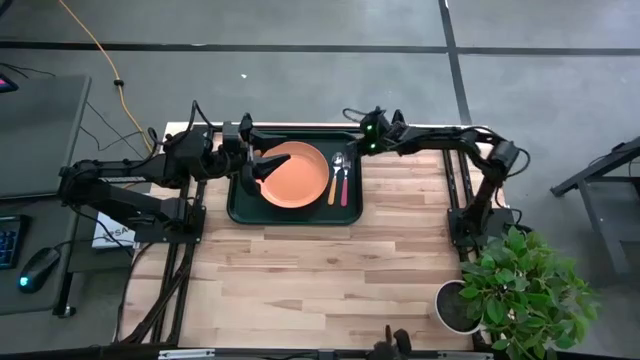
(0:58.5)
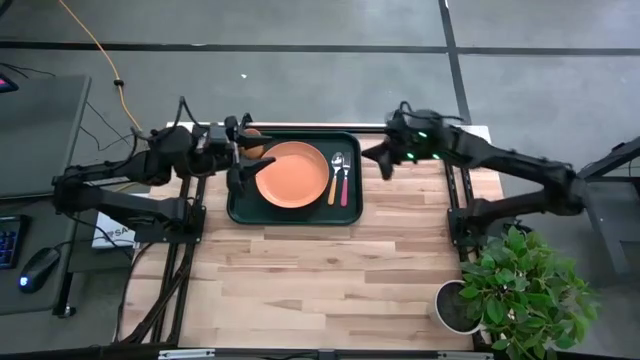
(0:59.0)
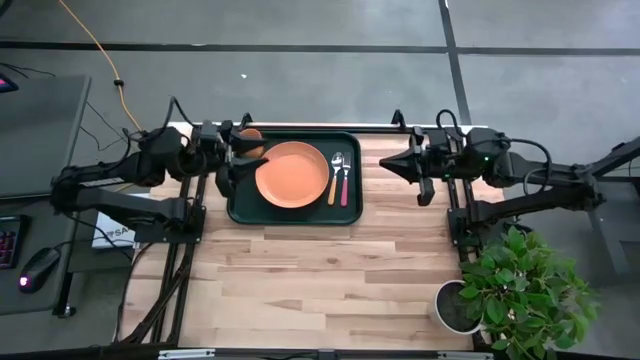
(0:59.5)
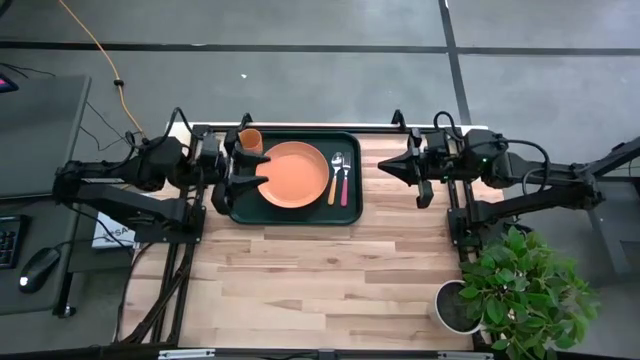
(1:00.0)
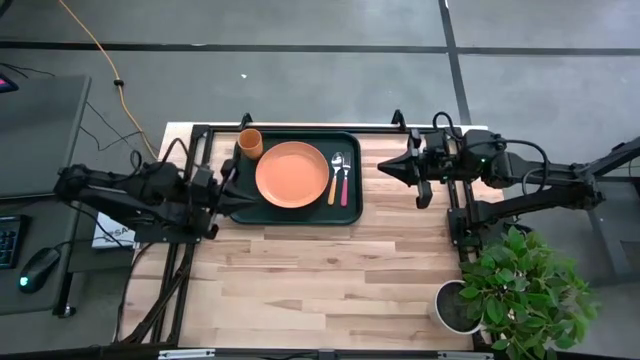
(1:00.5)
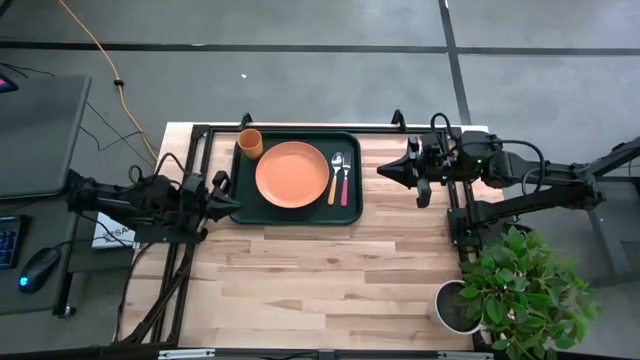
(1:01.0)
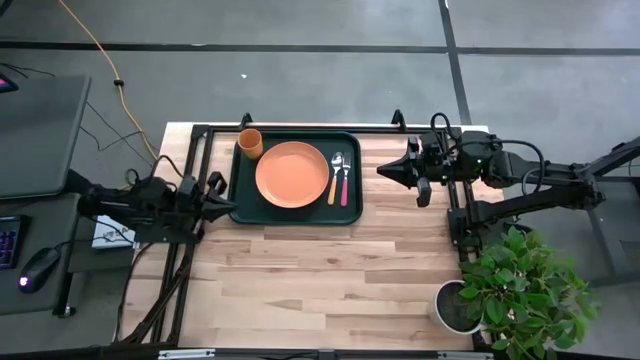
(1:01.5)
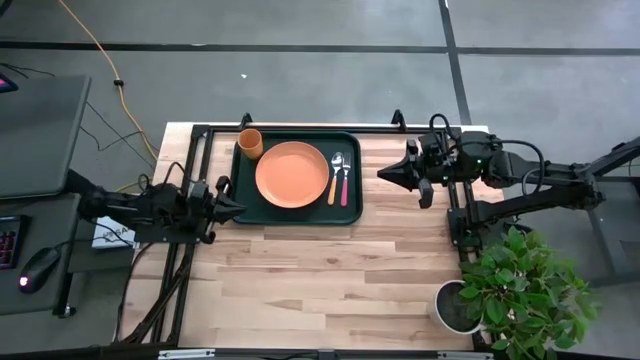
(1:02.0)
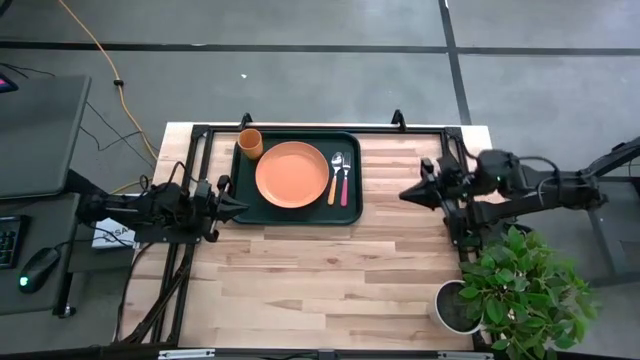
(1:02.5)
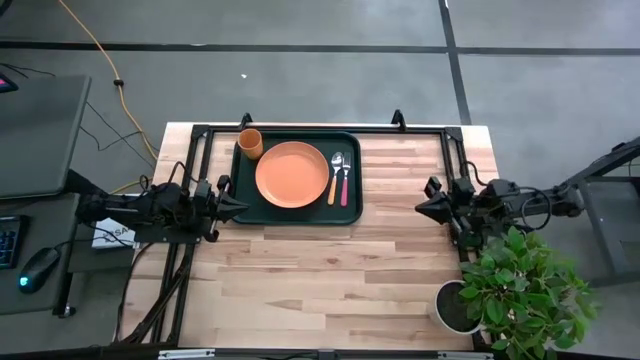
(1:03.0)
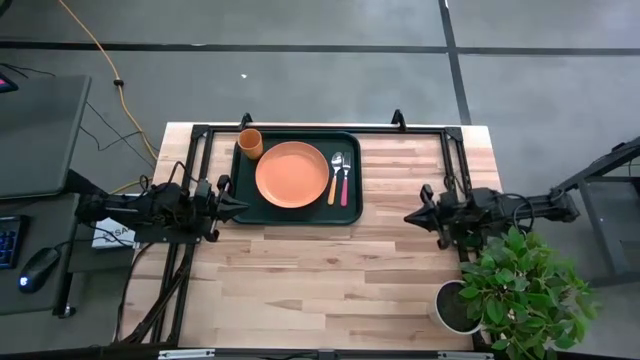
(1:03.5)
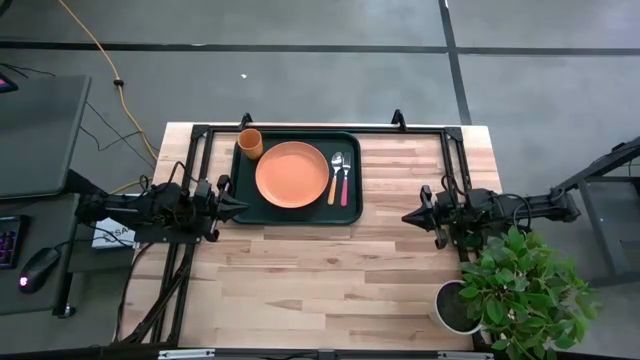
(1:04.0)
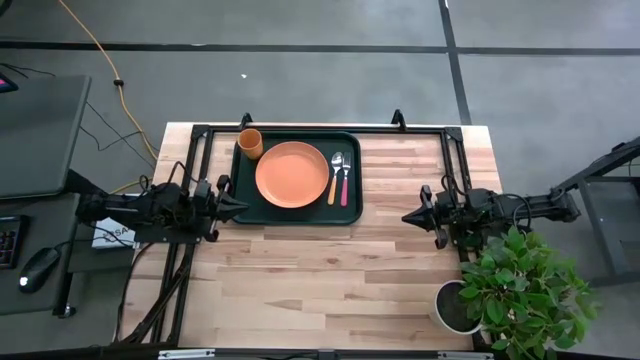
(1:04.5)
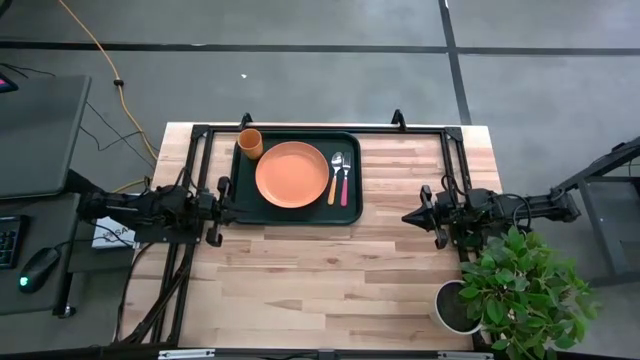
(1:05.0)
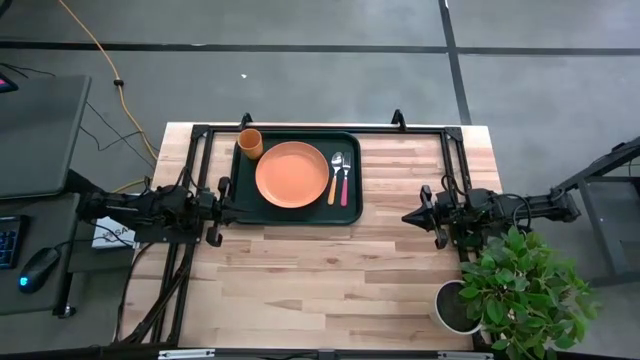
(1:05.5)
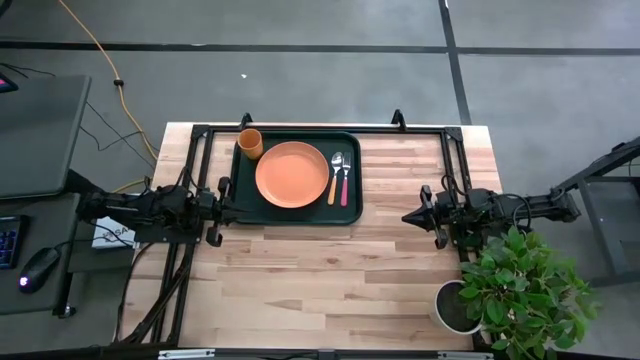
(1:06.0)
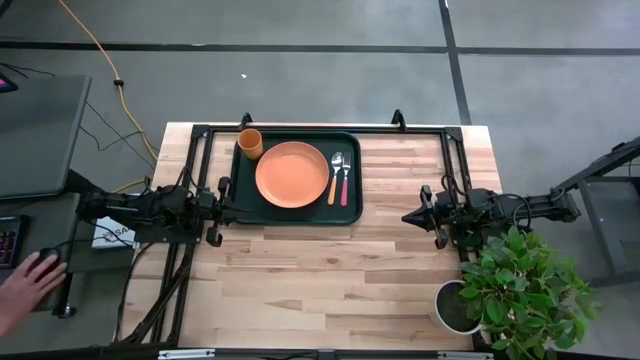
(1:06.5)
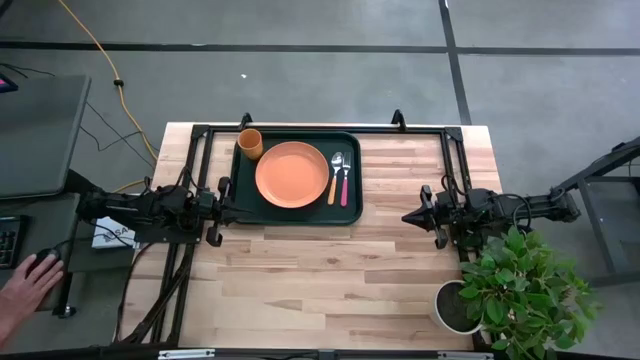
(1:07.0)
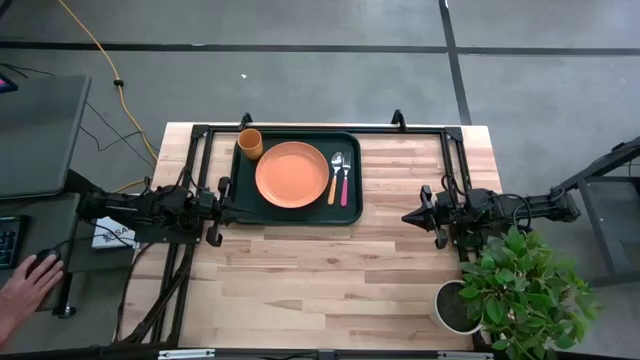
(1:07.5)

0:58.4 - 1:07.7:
Task: Pick and place plate/cup/fork/spoon on tray
Return to Home Position

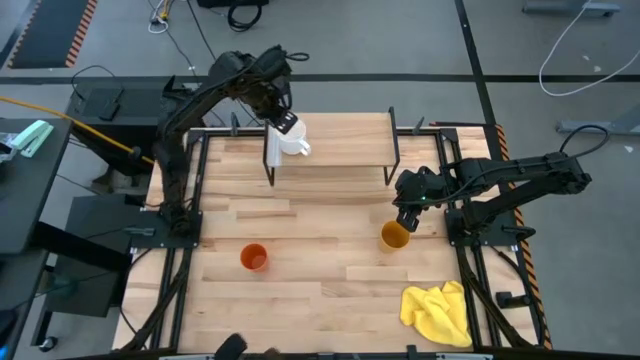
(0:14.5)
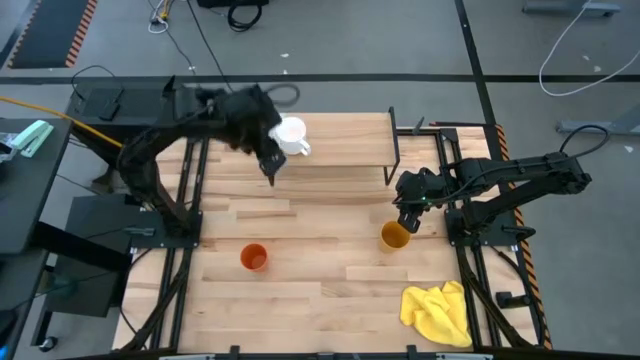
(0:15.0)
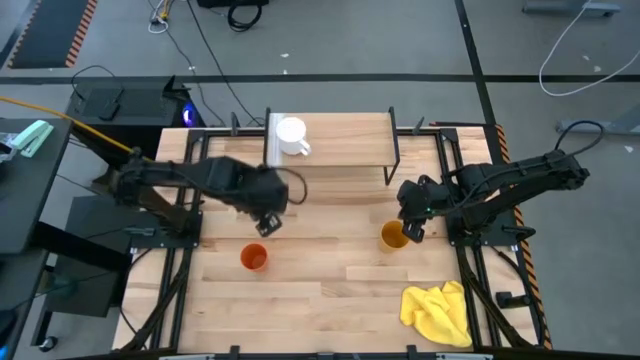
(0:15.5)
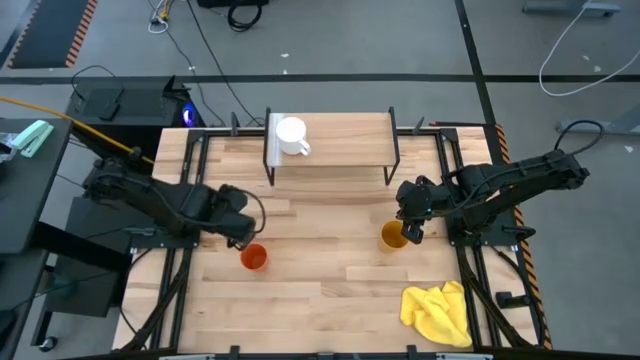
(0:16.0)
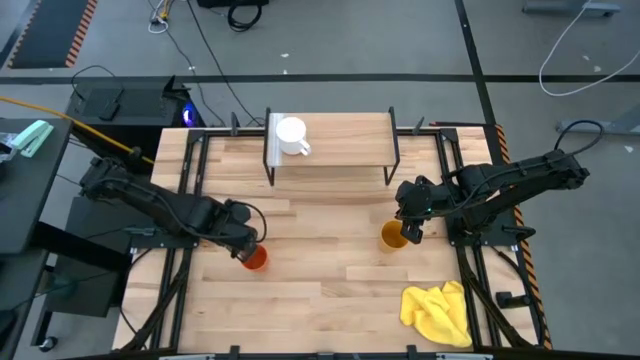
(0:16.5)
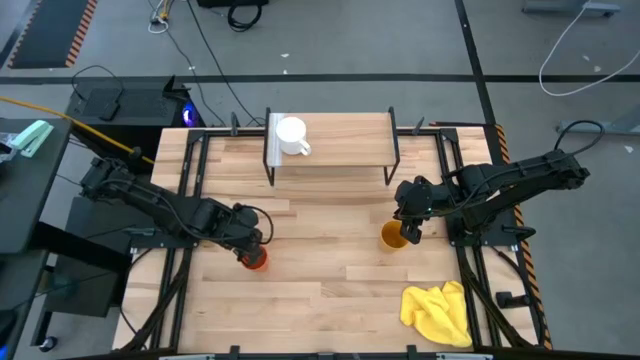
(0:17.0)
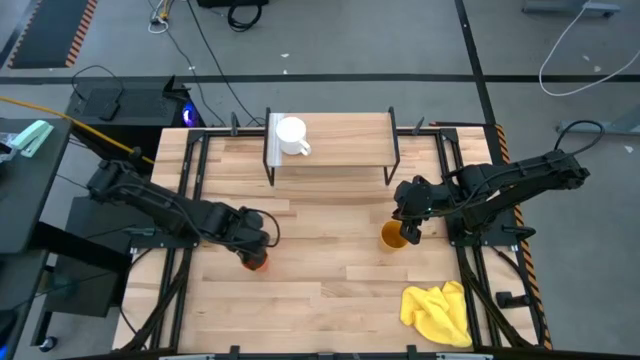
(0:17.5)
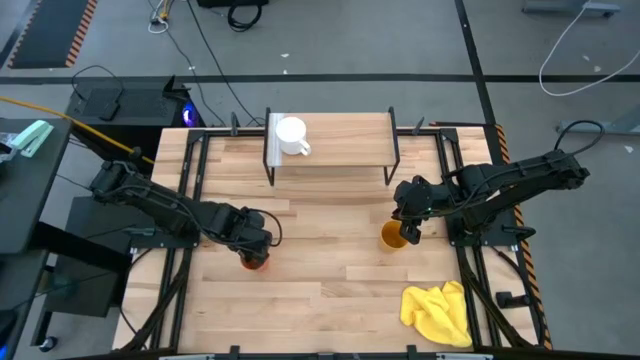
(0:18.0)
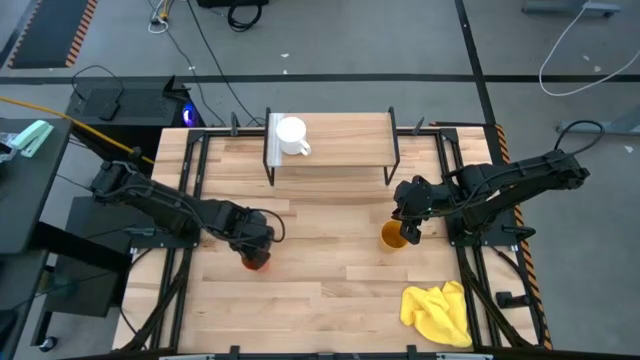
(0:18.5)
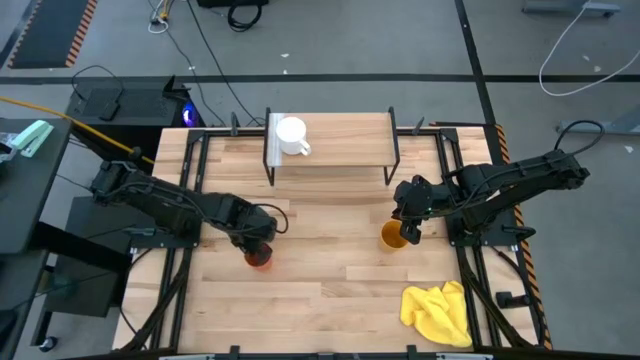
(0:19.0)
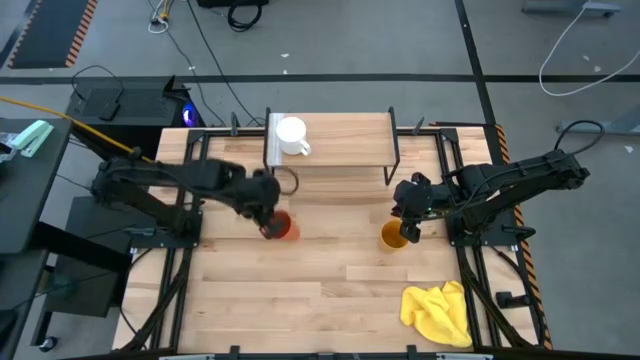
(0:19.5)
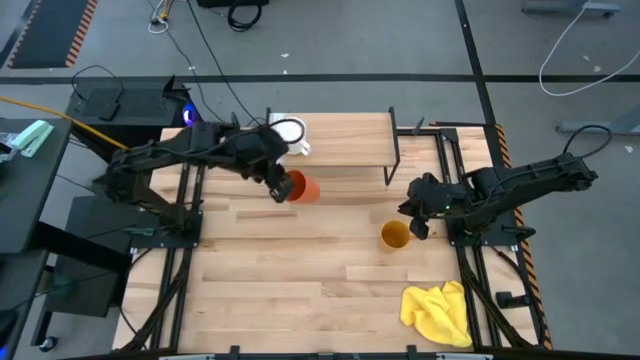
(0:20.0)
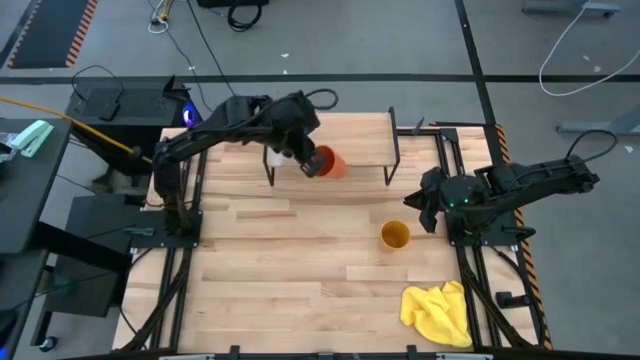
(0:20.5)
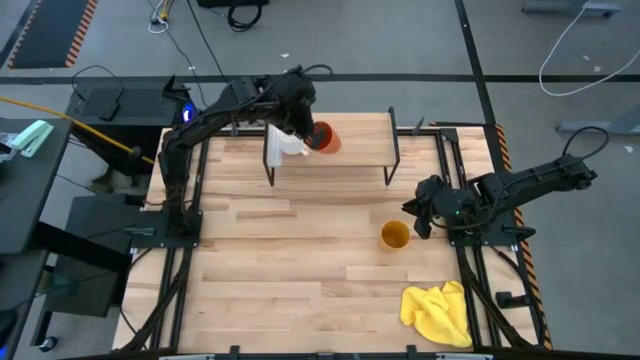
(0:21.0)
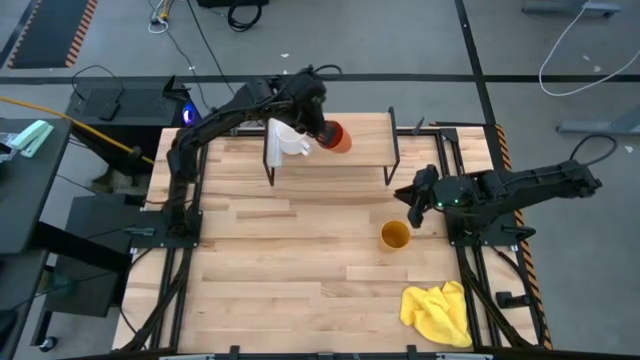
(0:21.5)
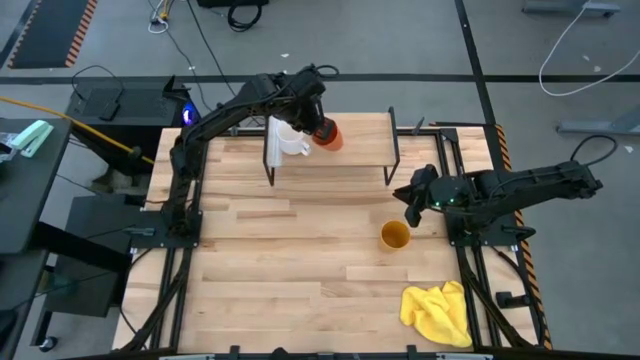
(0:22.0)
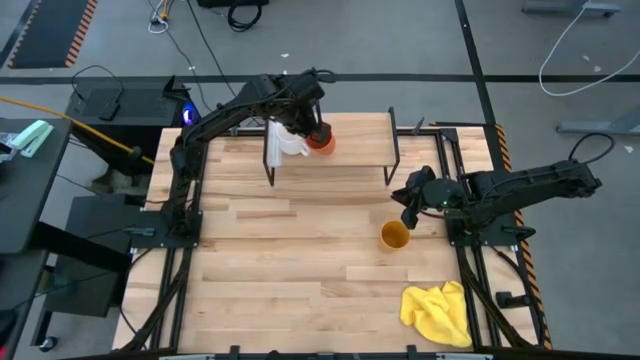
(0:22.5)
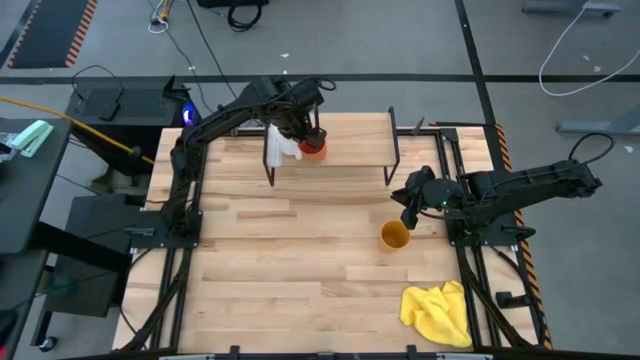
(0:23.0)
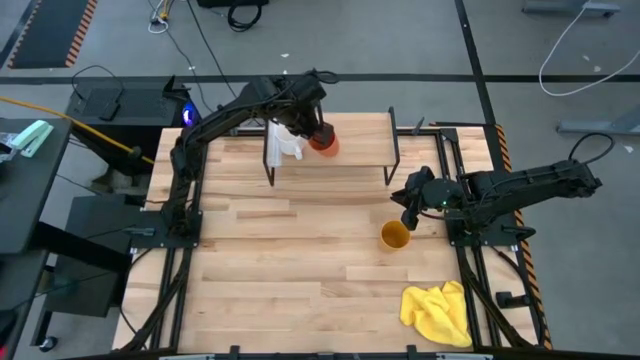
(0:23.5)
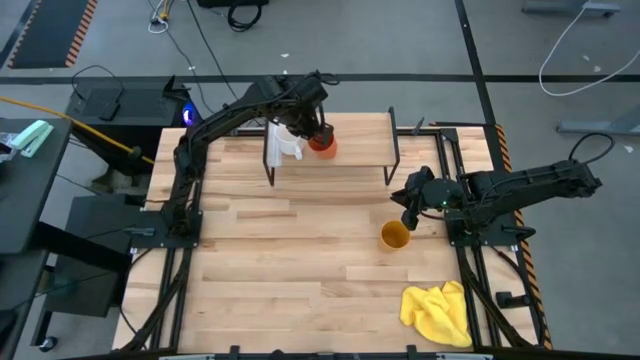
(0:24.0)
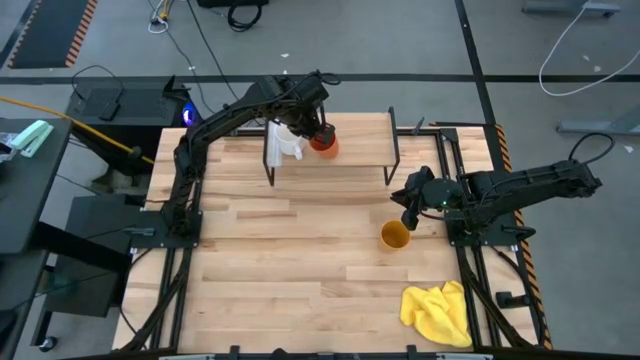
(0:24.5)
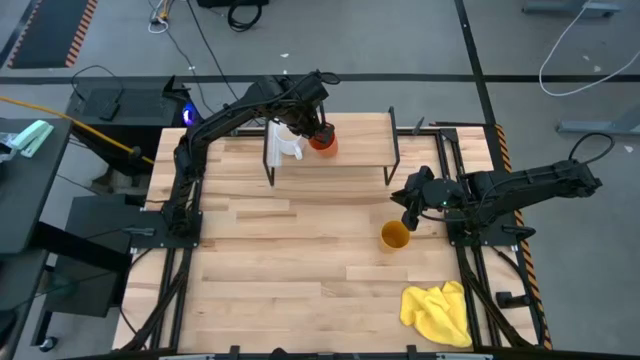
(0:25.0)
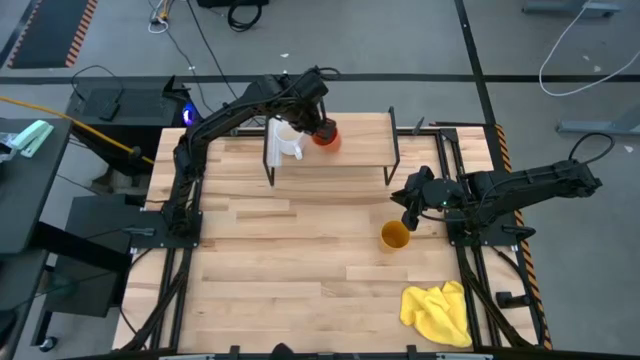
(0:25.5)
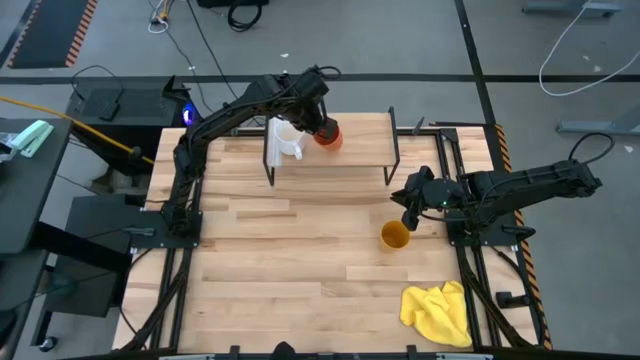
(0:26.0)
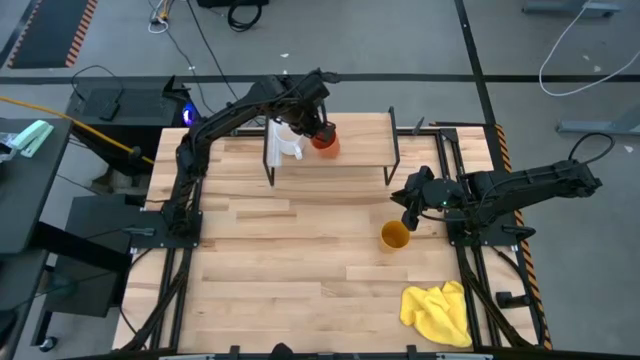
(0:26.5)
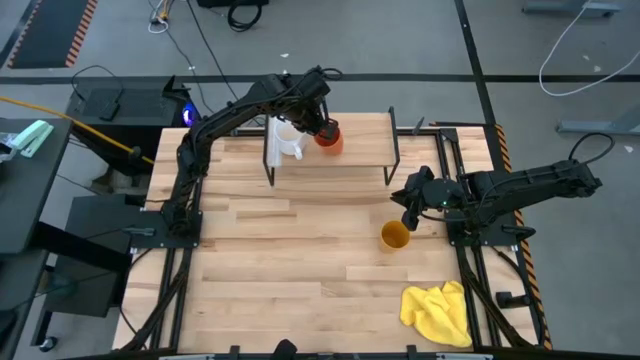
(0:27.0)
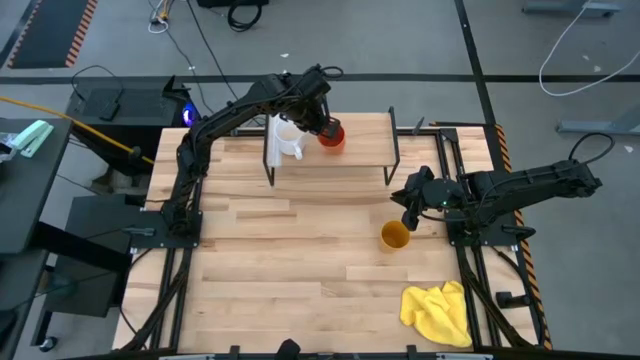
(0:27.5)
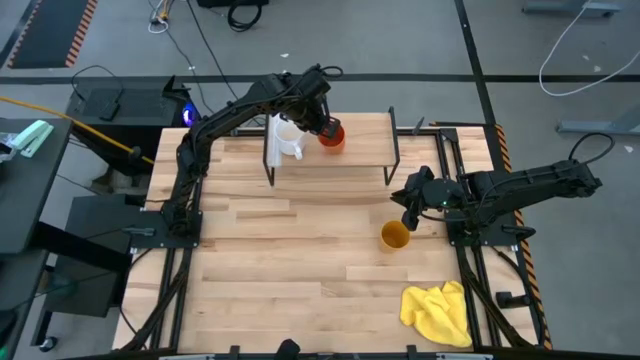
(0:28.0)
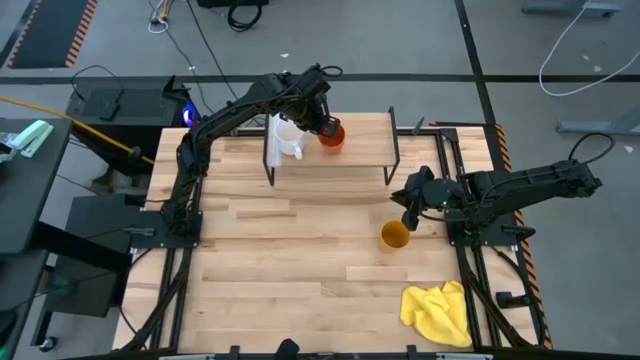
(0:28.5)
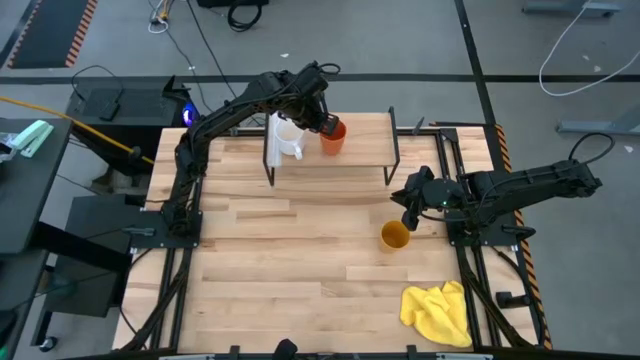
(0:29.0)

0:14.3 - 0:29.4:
Task: Stack small to large cups/mugs on shelf
Put the orange cup on the shelf
